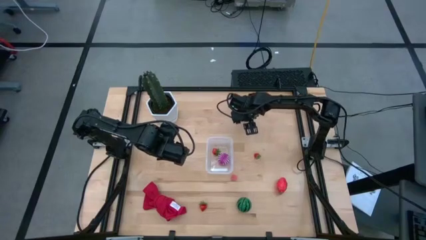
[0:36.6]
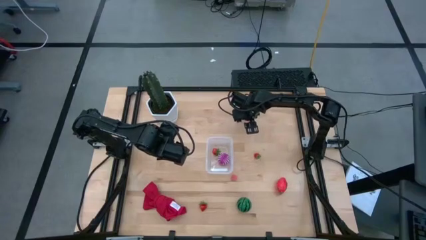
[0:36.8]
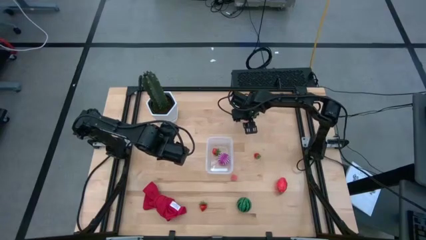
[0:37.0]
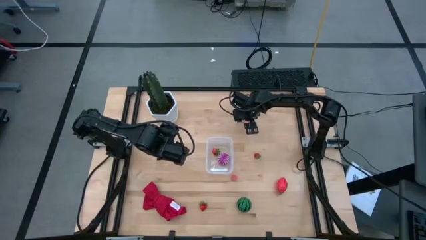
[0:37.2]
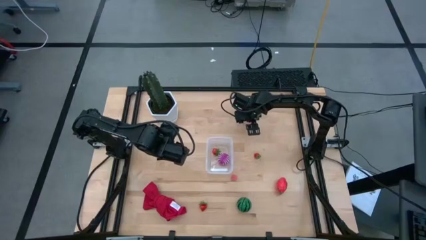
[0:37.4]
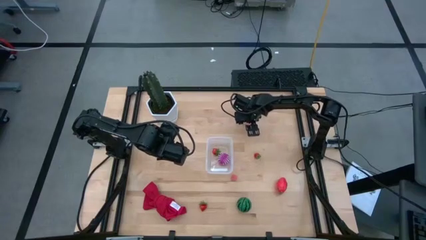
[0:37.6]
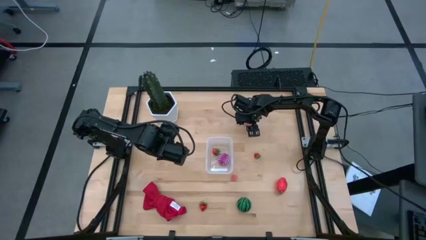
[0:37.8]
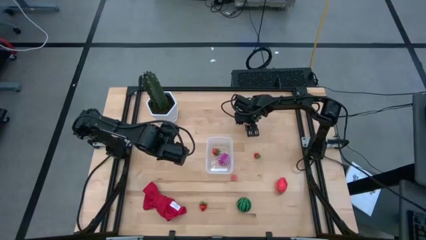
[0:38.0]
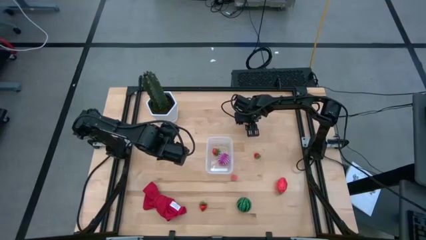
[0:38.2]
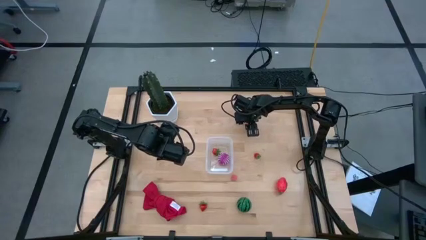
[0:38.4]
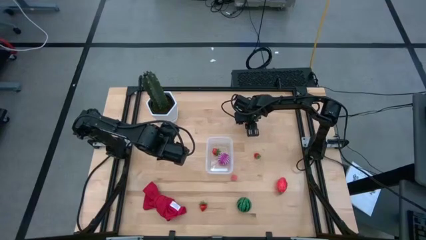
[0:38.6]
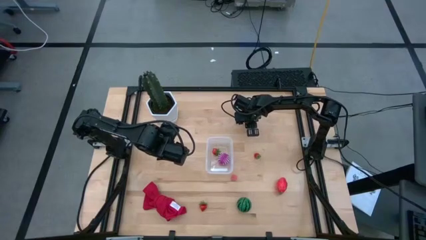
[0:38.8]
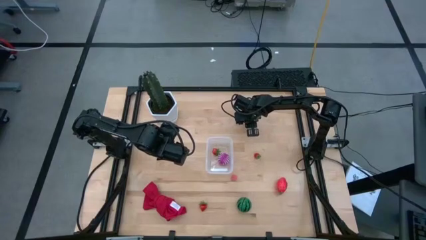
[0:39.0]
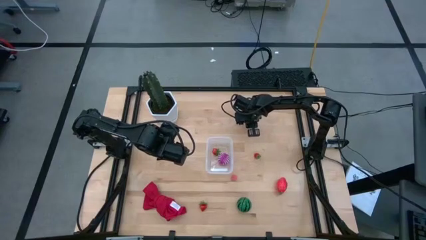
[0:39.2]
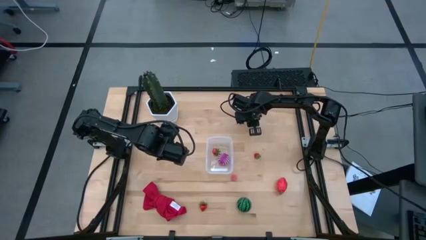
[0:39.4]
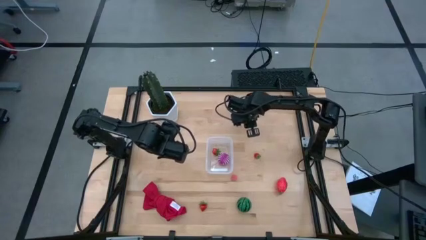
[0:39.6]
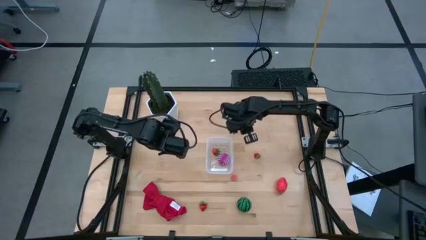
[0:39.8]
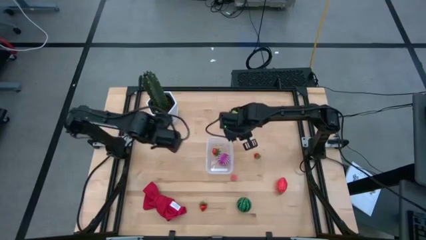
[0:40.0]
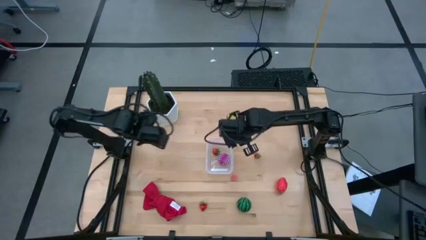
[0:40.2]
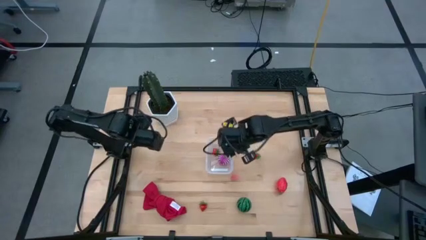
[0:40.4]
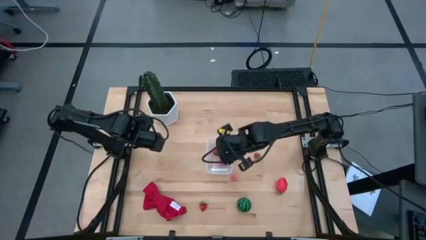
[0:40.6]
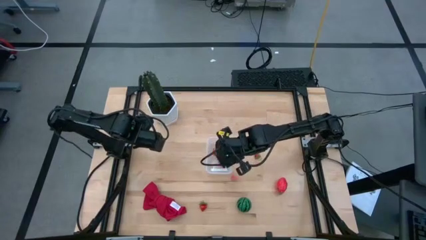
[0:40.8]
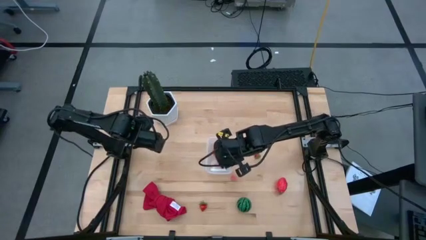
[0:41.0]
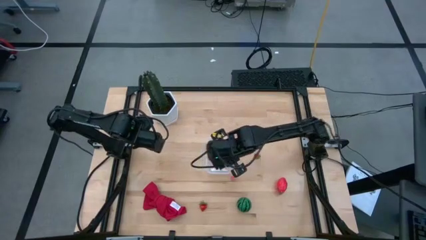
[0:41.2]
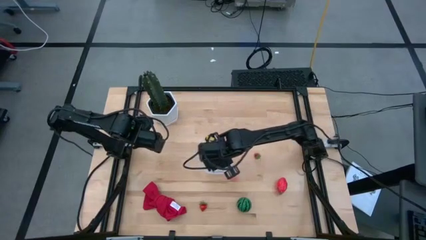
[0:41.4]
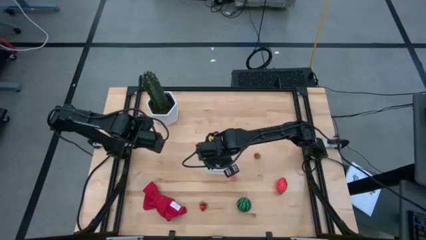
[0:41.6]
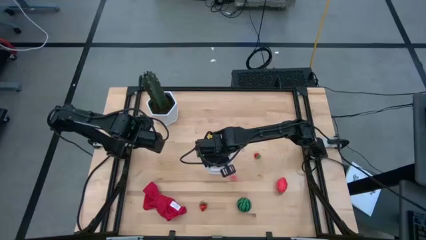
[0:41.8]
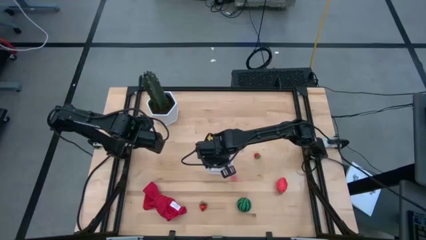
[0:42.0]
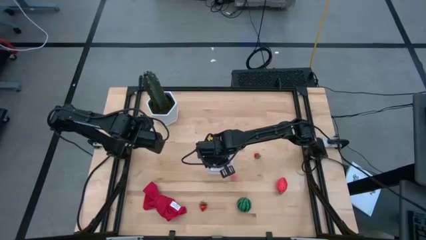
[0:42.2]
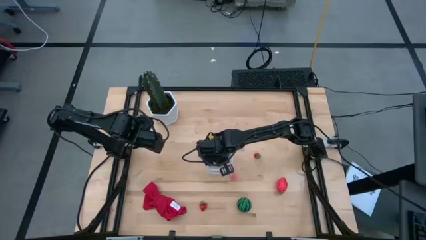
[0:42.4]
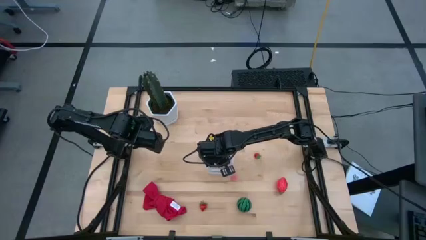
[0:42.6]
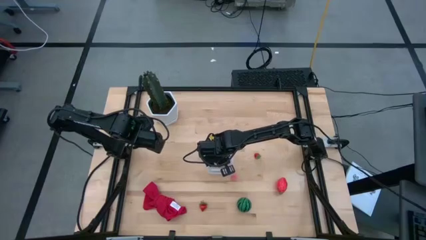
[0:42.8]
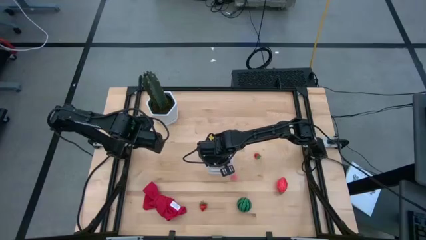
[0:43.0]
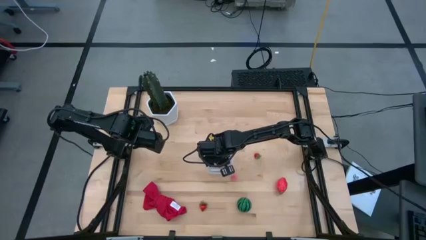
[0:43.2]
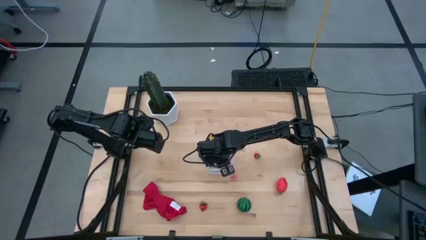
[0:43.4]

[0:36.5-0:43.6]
Task: Pick and placing Produce into tupperware
Put the top pink peach into the transparent bin

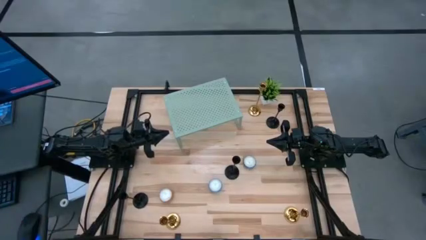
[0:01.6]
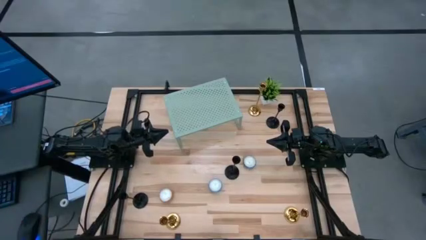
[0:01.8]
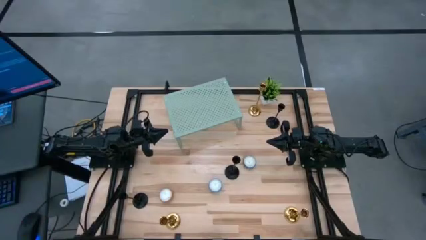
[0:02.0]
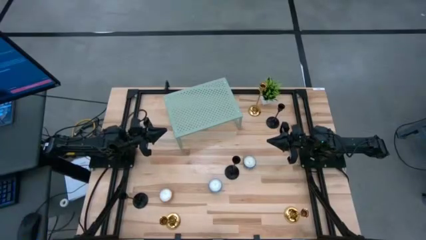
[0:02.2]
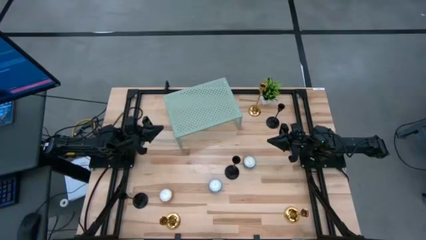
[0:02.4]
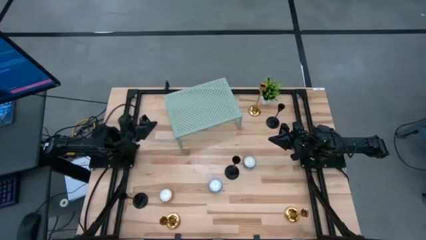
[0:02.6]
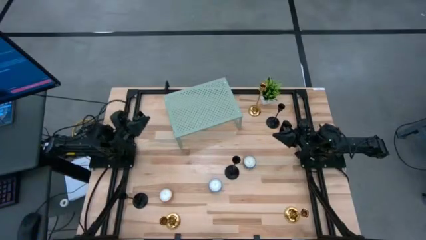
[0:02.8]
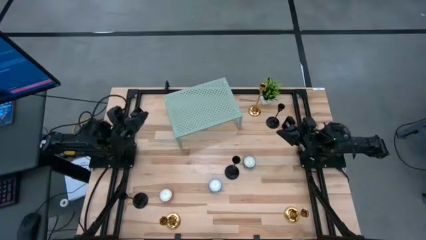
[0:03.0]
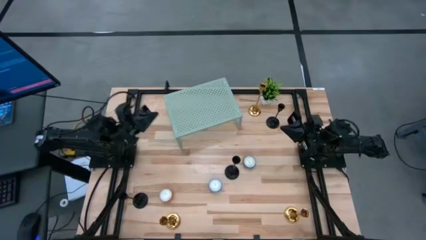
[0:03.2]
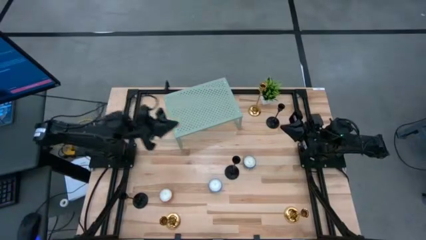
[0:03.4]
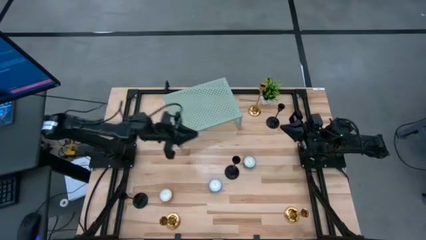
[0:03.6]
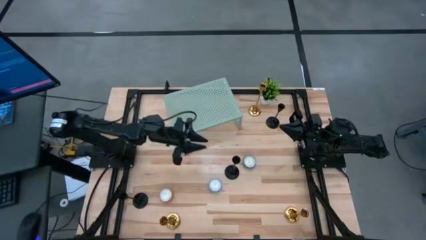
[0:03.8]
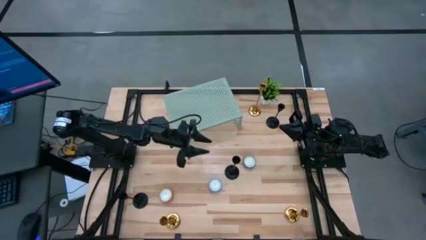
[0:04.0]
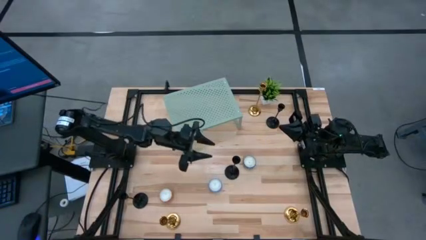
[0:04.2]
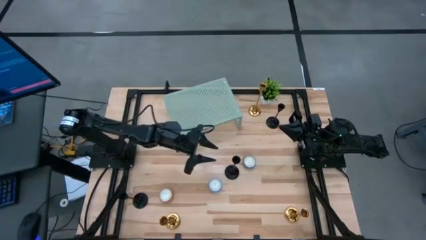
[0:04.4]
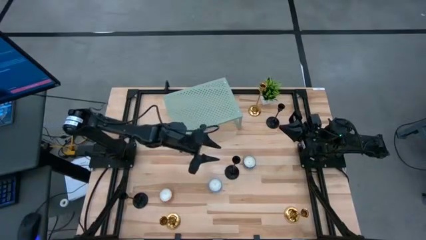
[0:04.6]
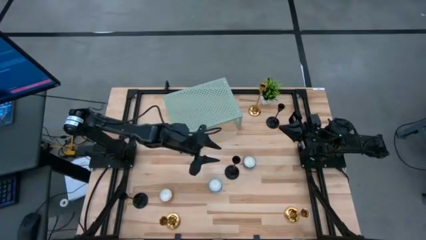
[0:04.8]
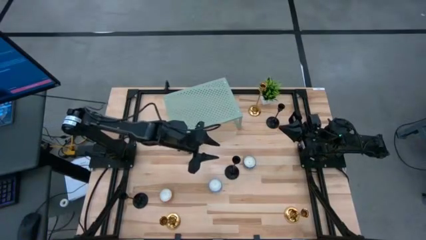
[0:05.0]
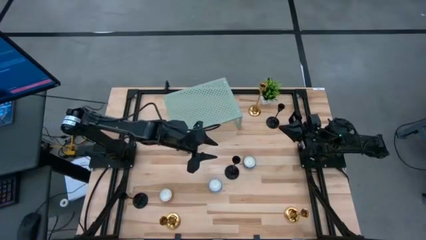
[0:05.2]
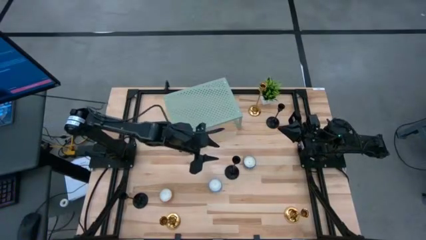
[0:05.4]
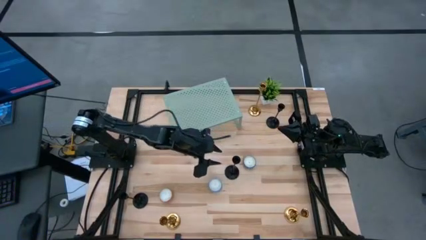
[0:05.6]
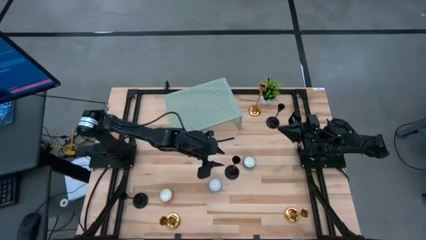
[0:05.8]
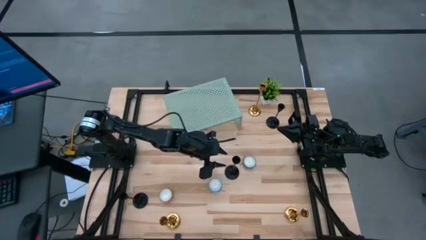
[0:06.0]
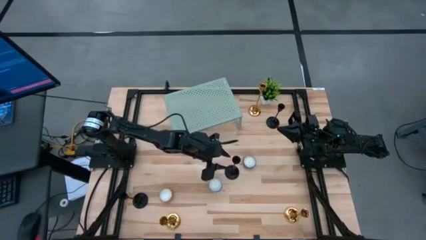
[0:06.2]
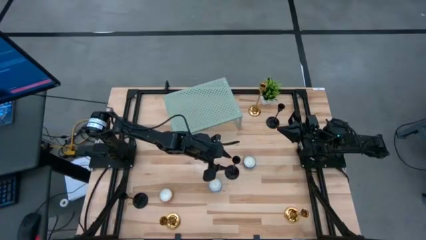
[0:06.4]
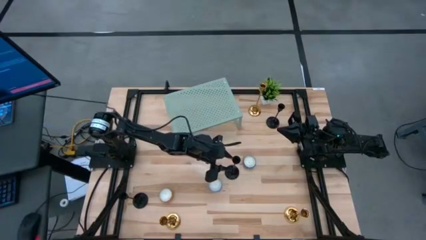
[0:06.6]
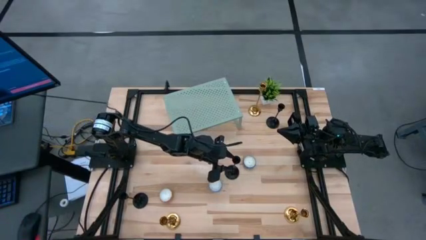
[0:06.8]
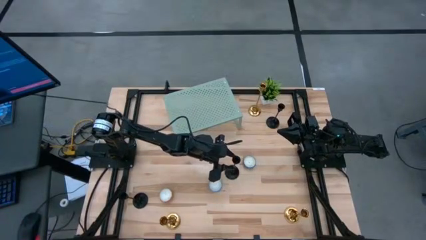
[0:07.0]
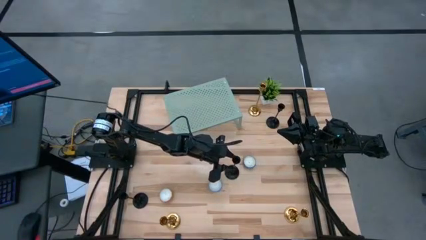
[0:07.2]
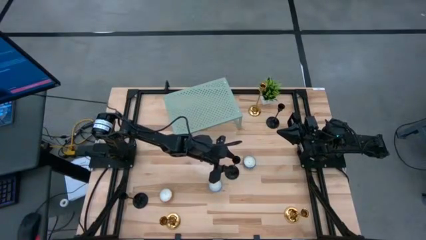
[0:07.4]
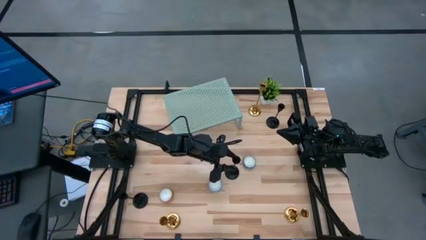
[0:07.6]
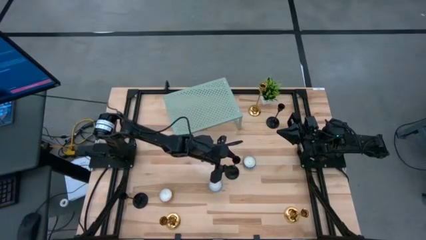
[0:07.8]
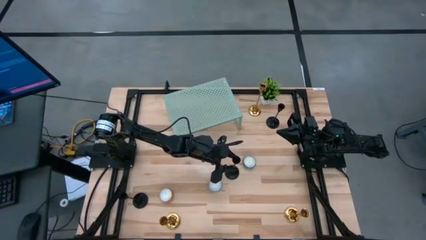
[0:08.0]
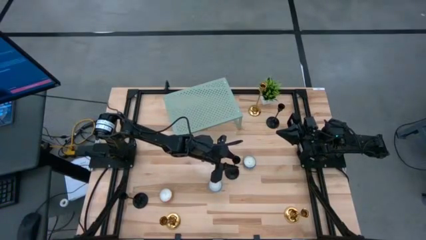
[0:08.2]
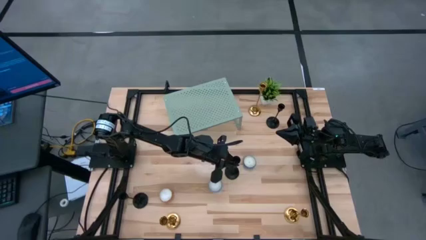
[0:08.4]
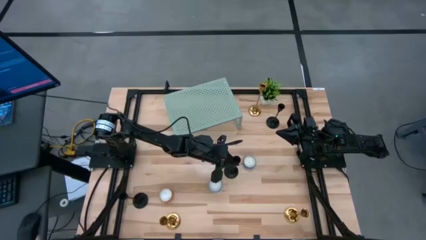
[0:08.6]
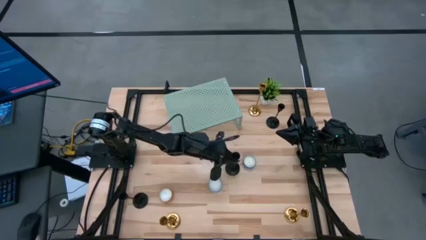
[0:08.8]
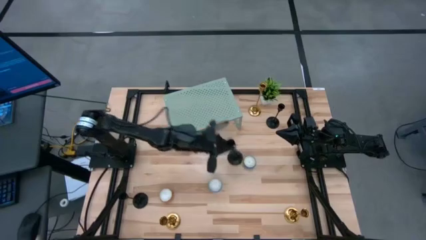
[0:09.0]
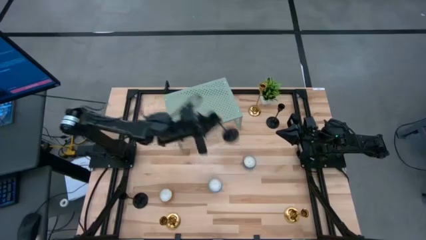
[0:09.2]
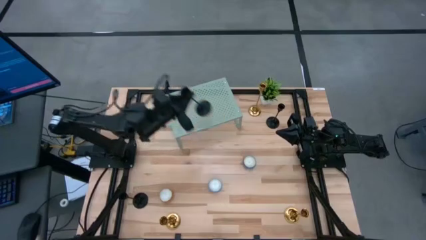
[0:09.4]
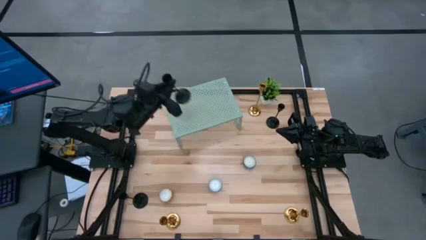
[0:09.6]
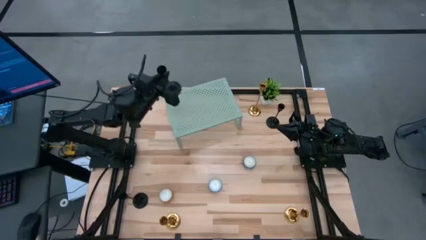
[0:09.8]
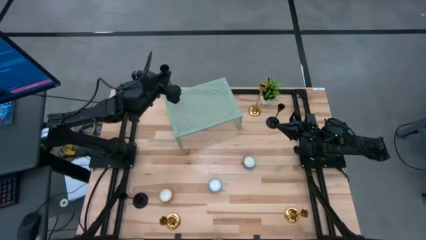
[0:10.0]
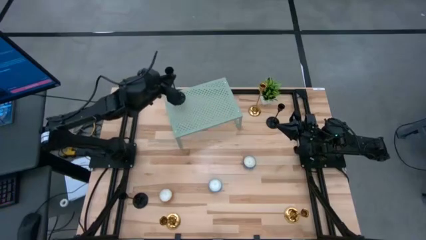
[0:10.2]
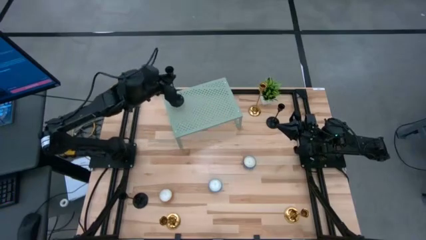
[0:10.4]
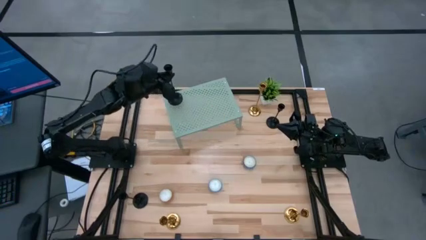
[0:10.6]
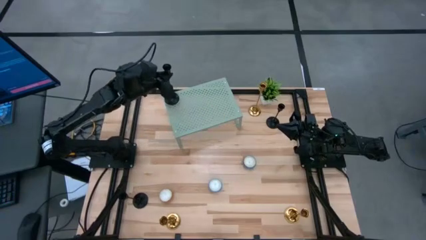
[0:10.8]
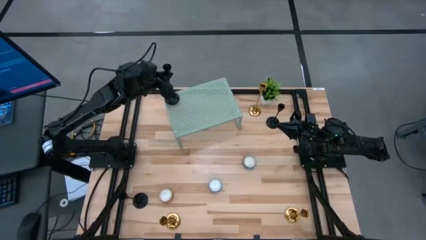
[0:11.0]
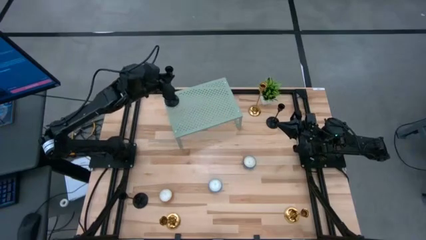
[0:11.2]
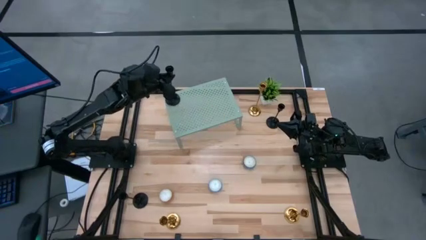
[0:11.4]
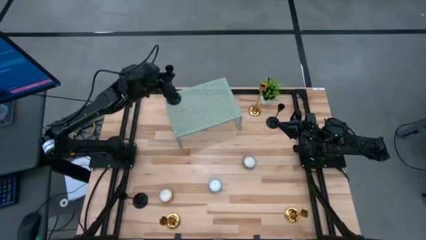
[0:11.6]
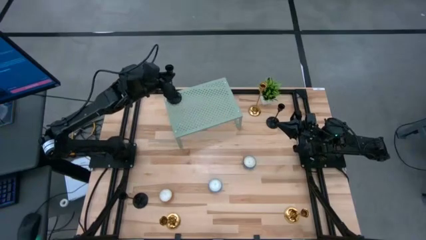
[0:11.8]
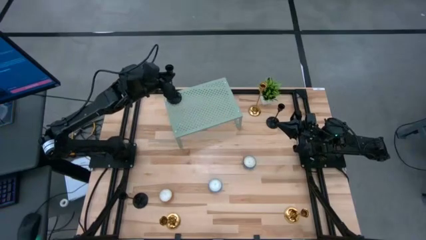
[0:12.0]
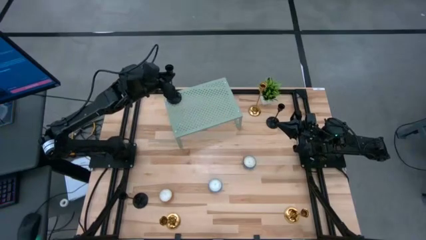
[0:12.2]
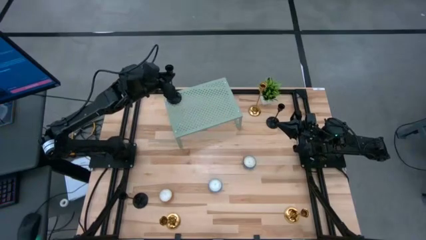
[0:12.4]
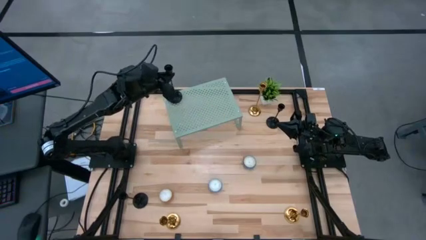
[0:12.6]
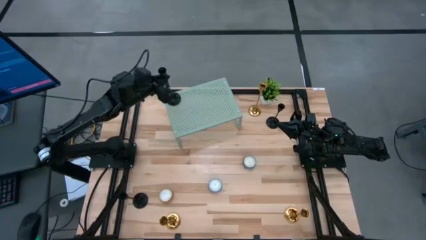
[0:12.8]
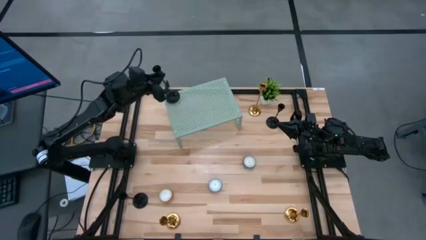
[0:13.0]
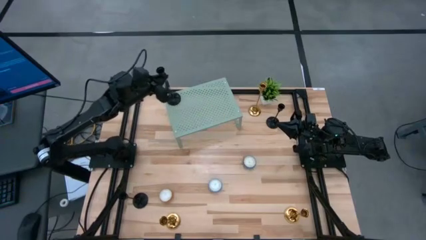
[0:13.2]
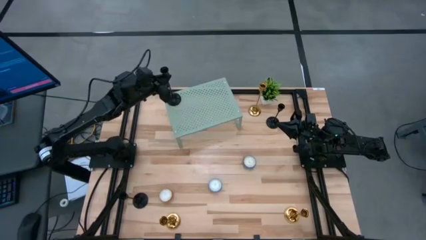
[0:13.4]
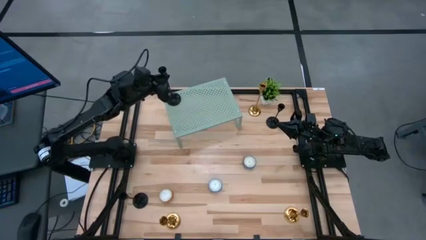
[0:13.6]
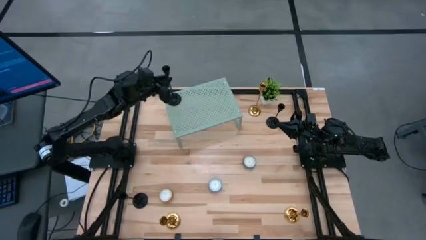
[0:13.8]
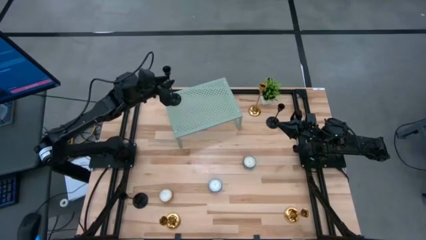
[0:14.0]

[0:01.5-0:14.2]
Task: Pick & Place candle stick holders
Put the middle black candle holder on the shelf
